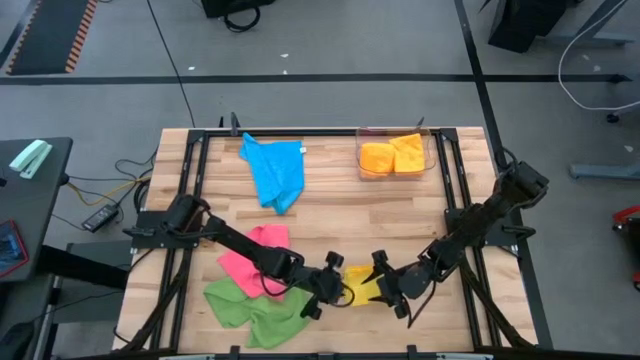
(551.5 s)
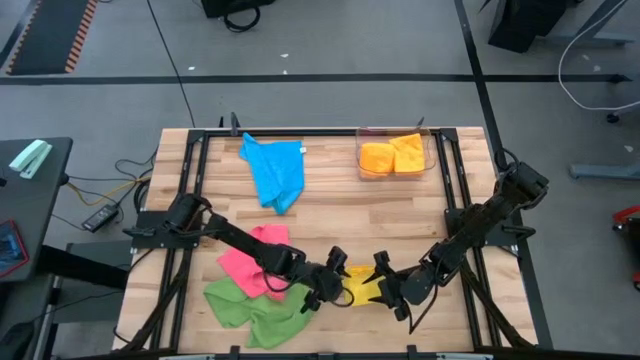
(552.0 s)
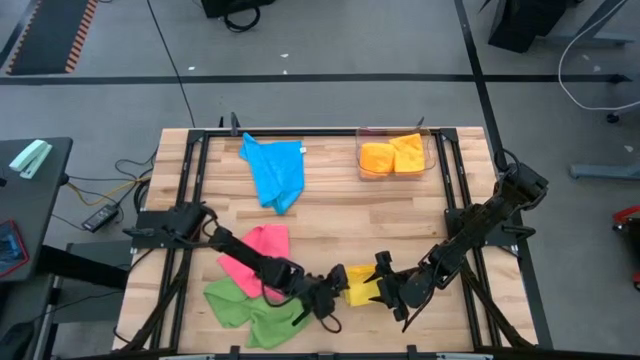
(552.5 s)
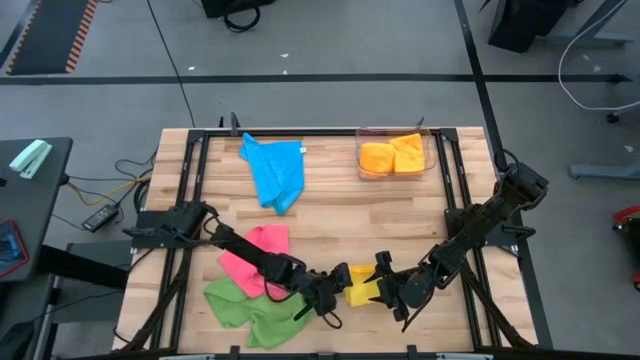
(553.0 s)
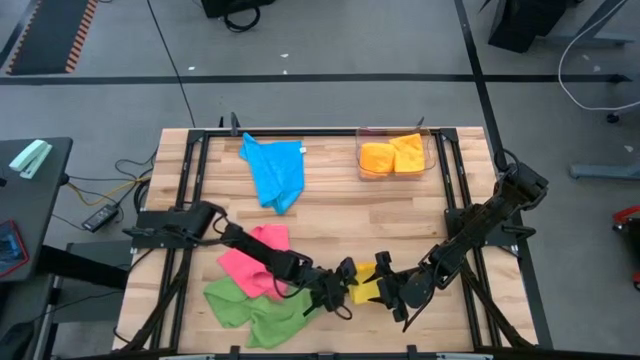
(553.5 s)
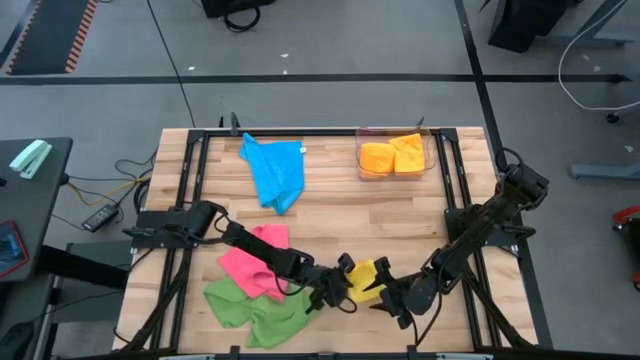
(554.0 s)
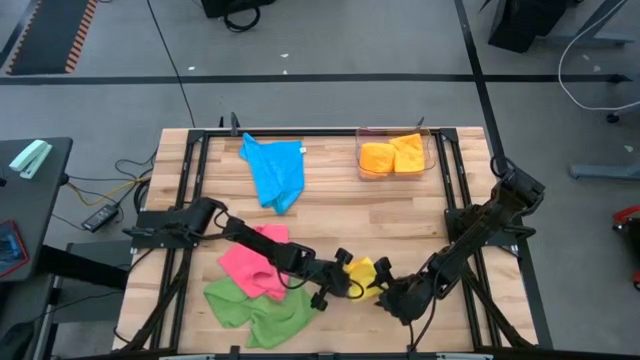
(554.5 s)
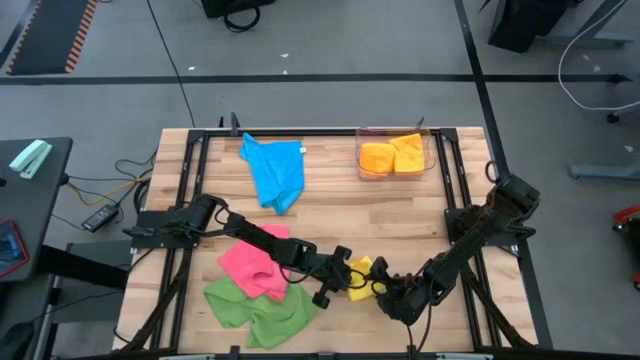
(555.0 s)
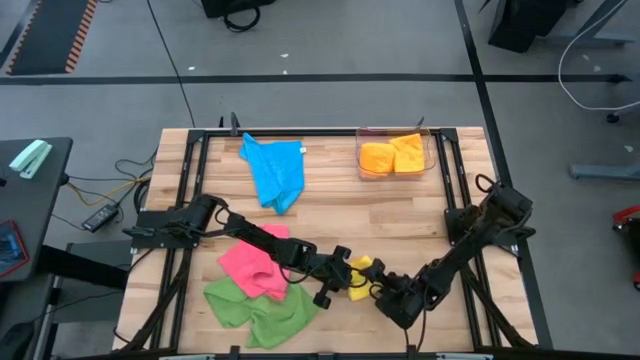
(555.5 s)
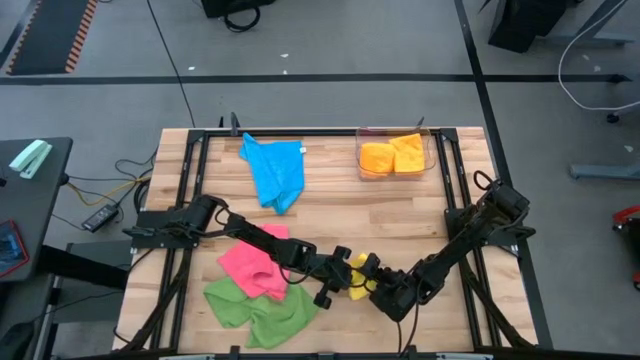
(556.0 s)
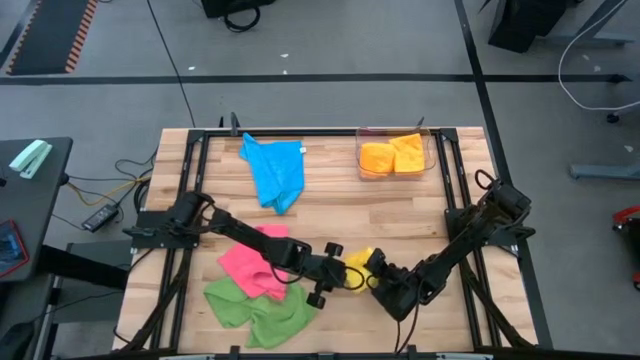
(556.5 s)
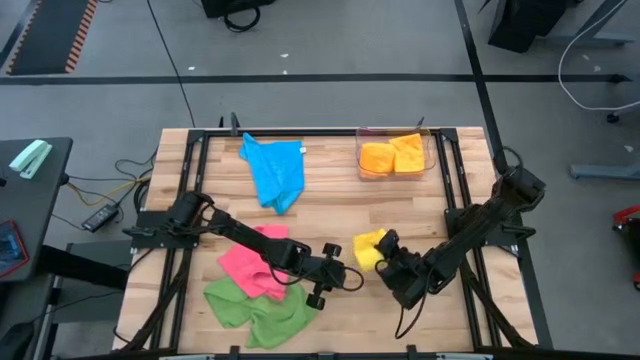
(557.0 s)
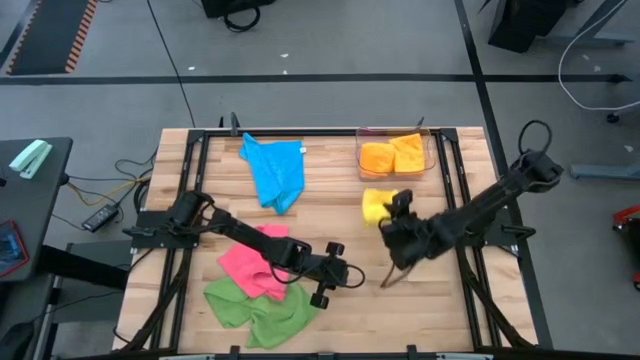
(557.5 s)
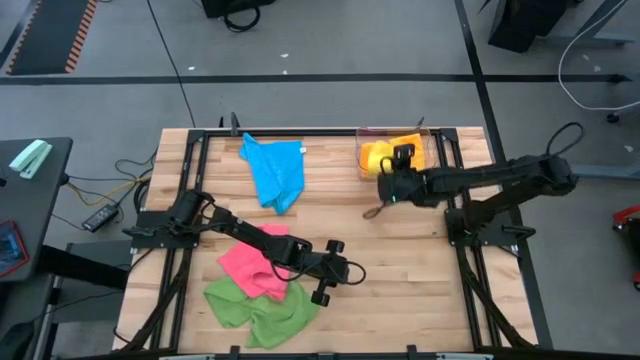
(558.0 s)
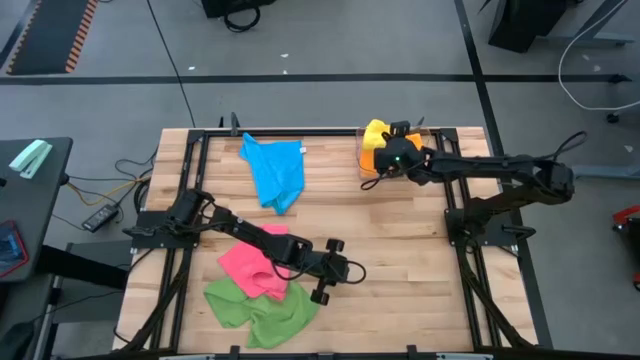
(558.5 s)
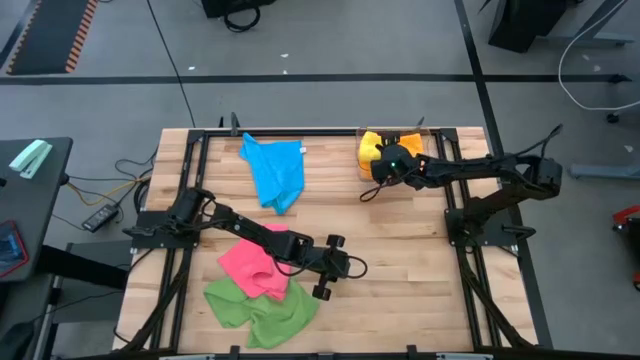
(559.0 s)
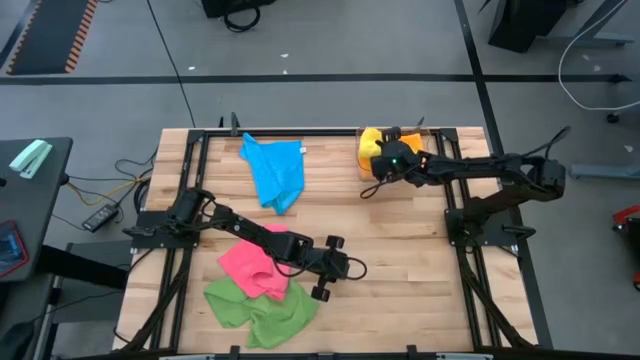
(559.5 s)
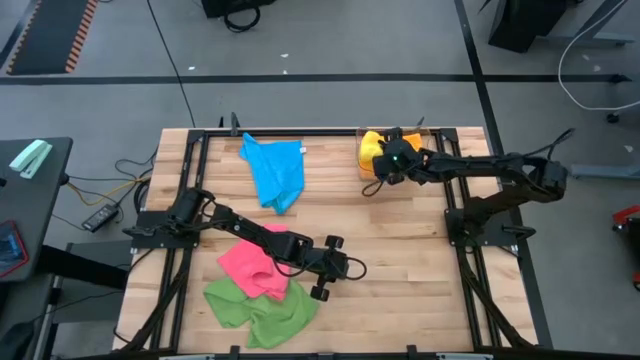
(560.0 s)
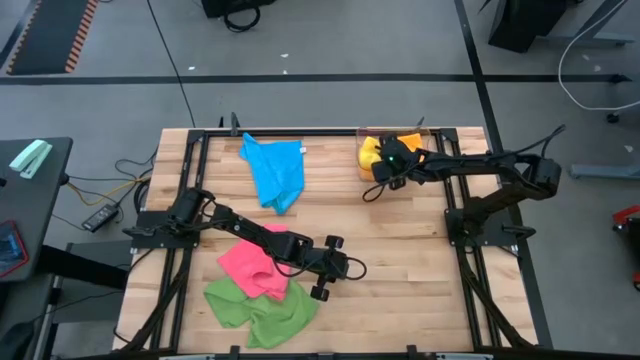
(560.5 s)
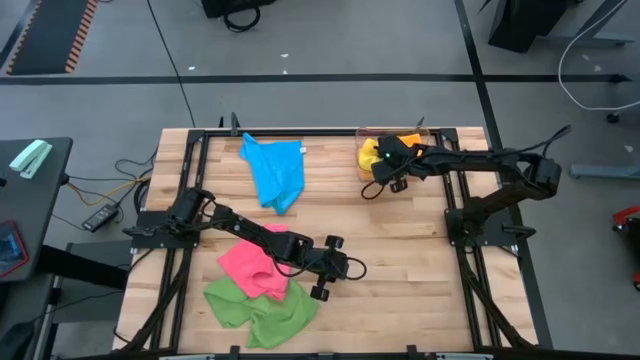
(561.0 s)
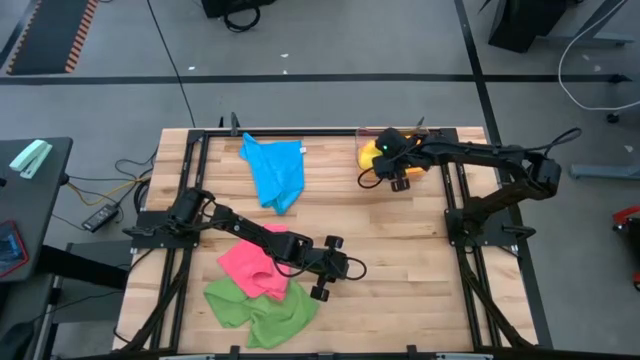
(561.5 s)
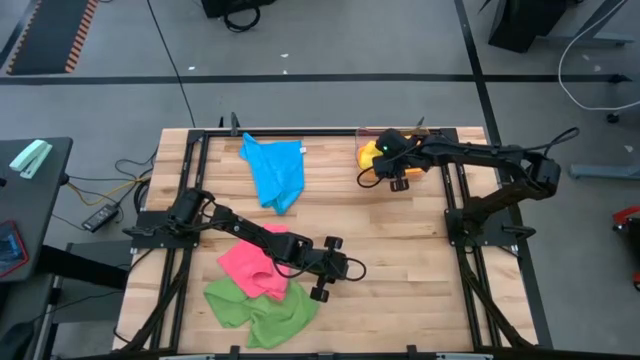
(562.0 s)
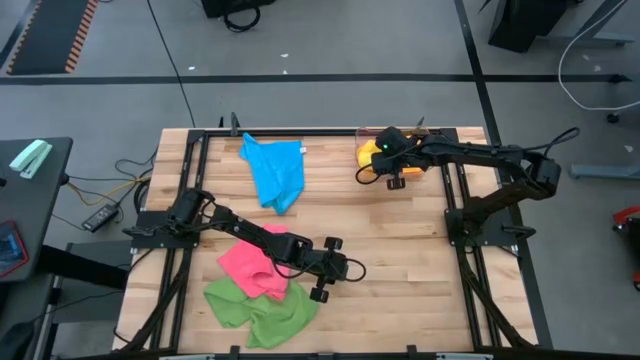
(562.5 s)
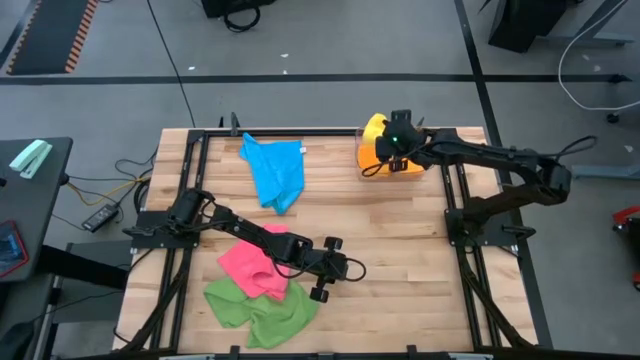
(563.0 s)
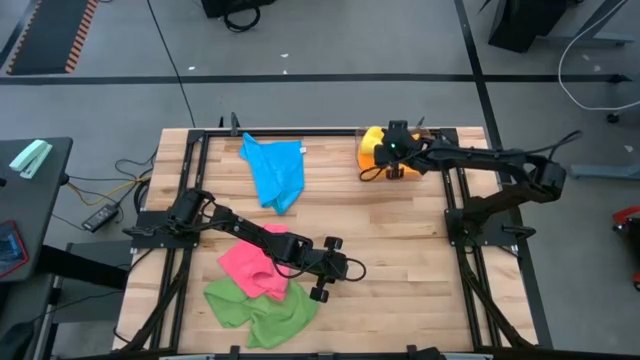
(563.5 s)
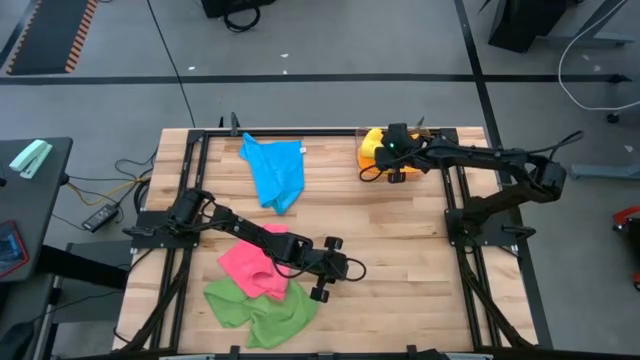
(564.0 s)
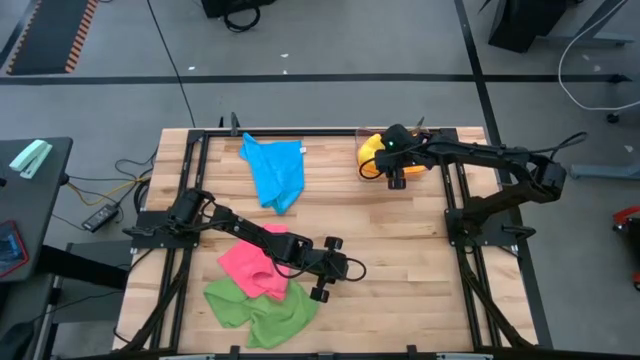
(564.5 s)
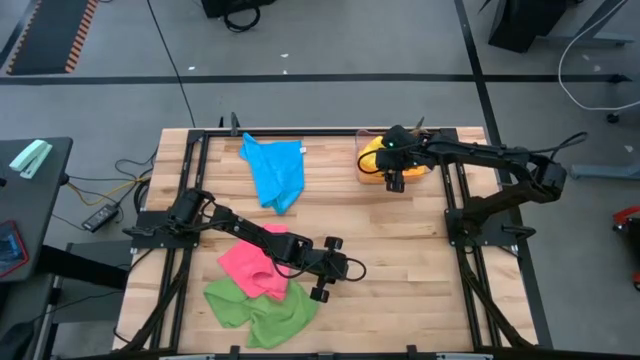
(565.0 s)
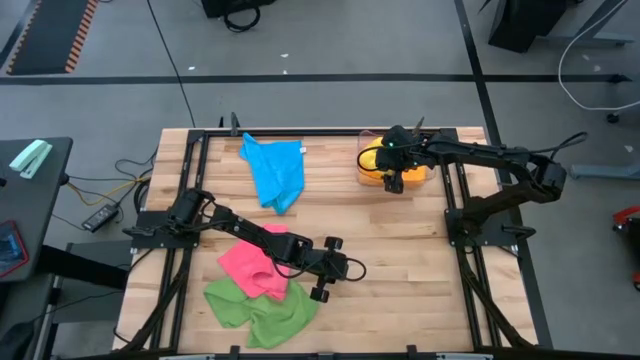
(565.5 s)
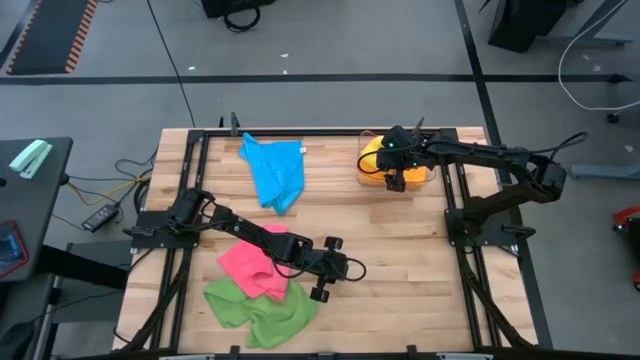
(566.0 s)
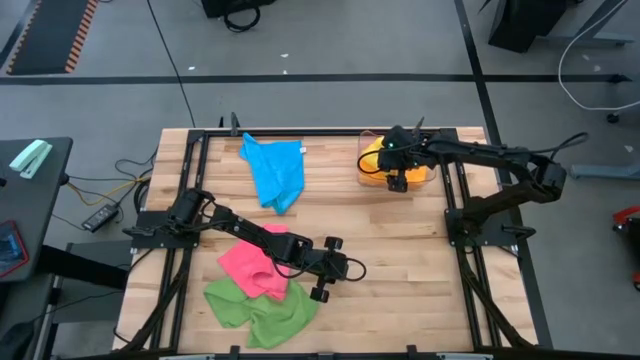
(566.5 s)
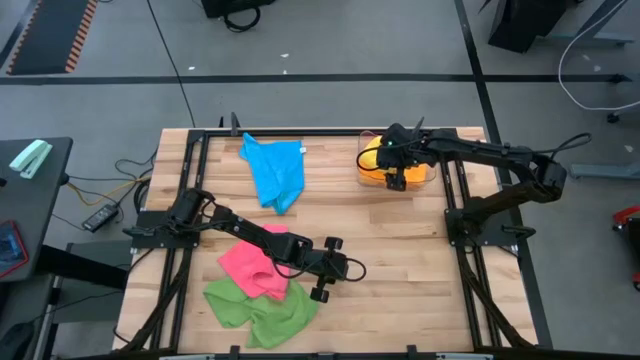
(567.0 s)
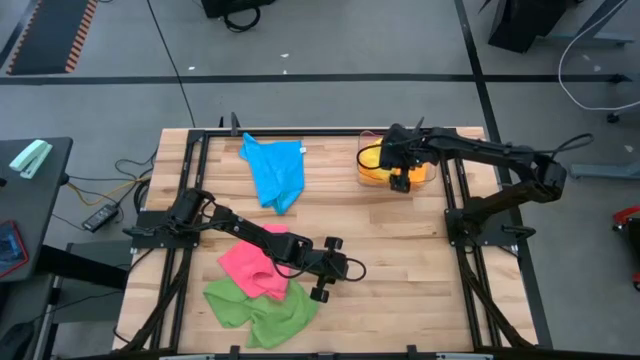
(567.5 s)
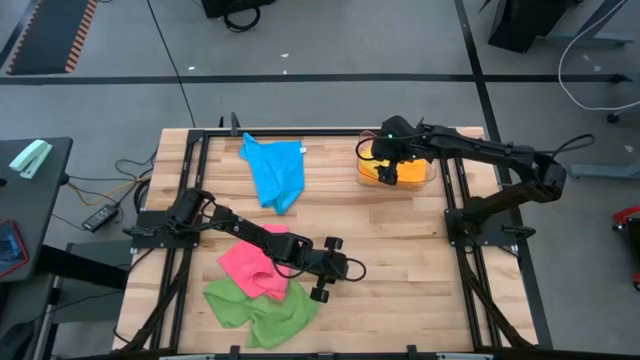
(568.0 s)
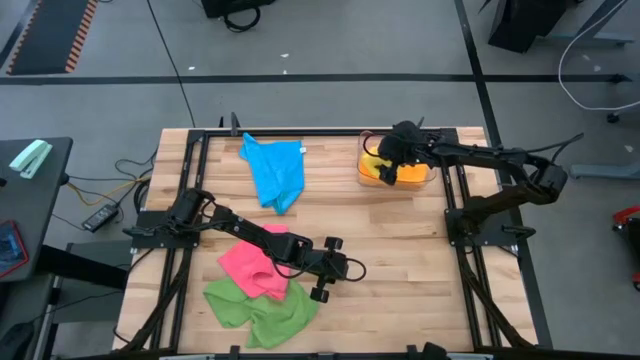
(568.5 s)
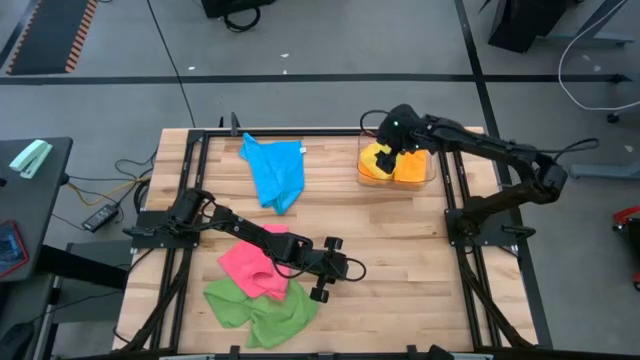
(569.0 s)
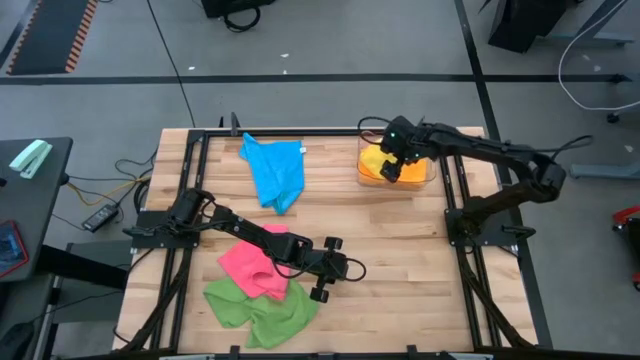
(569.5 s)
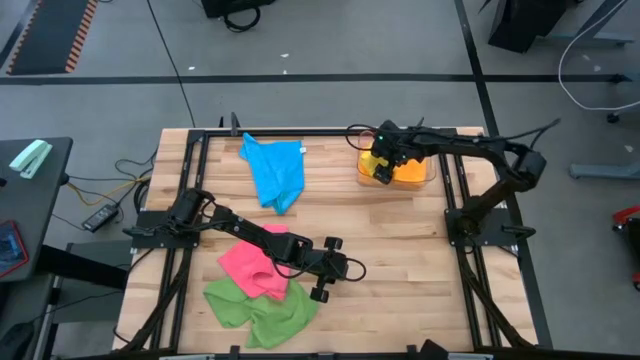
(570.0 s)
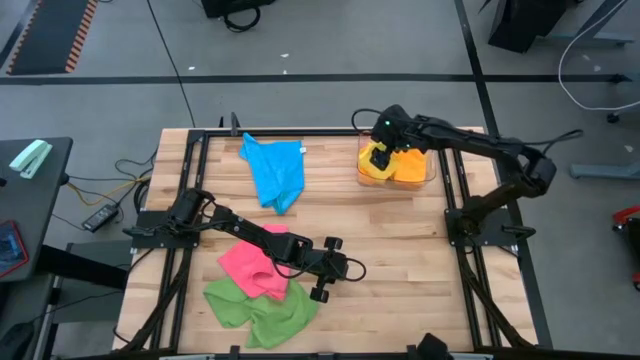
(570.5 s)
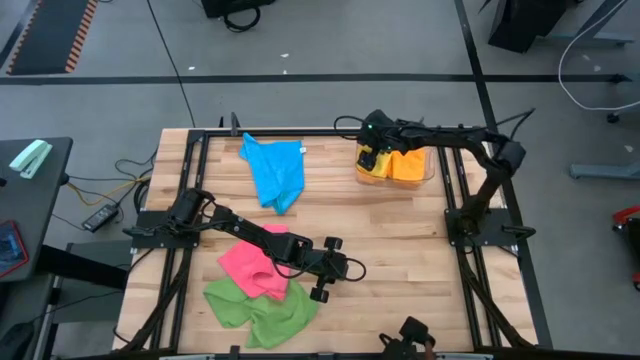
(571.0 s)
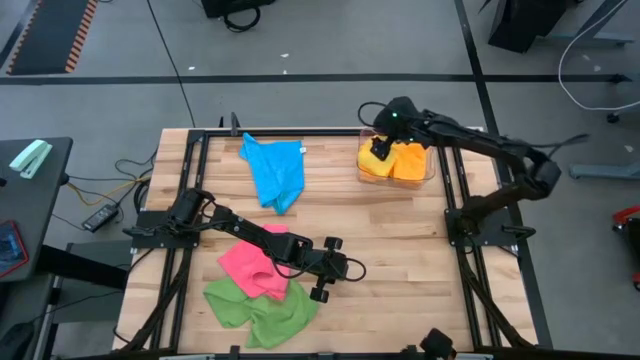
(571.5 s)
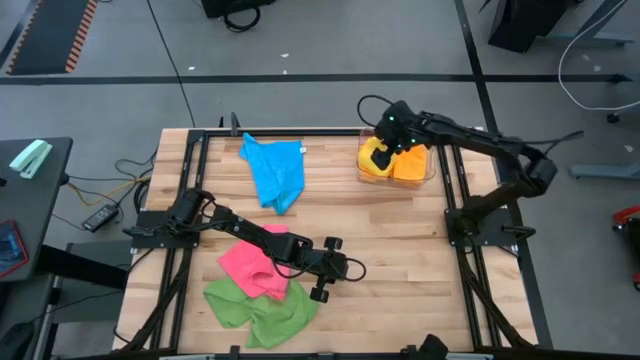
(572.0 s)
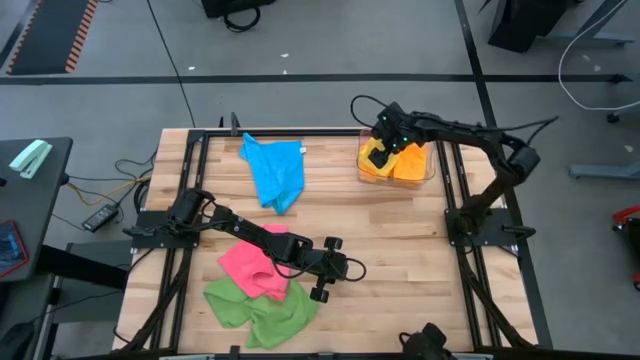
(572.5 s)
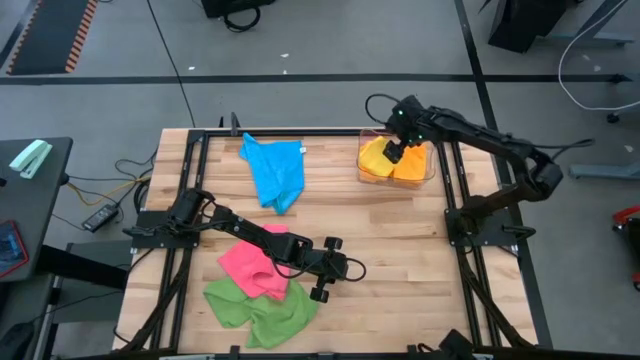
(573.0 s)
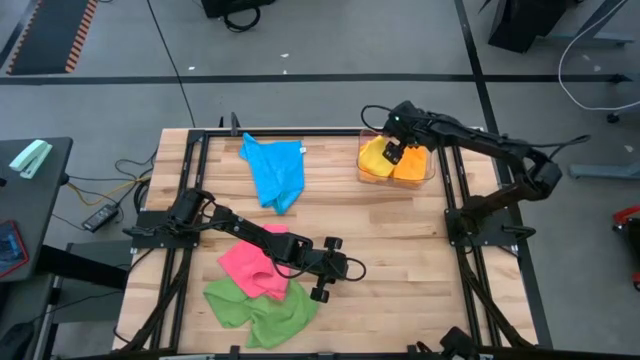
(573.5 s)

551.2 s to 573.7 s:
Task: Fold microfiber towels
Stack the folded yellow microfiber cloth on top of the folded orange microfiber cloth
